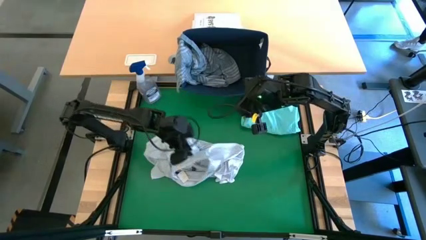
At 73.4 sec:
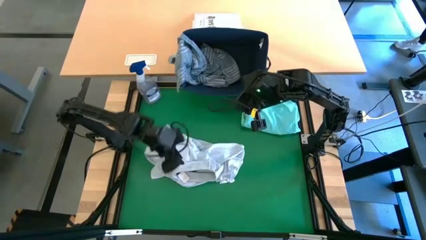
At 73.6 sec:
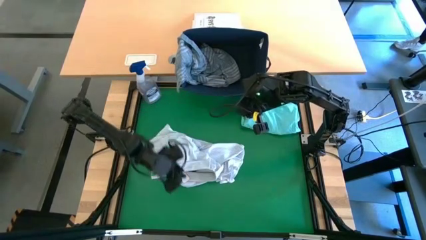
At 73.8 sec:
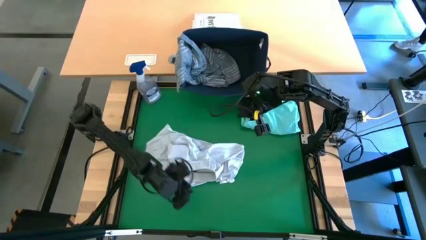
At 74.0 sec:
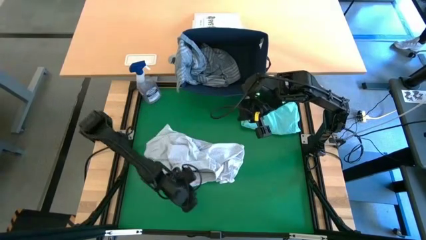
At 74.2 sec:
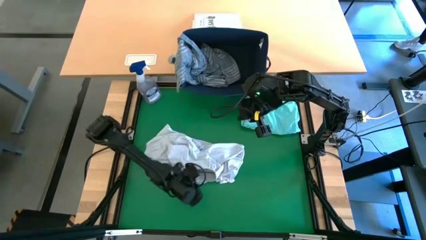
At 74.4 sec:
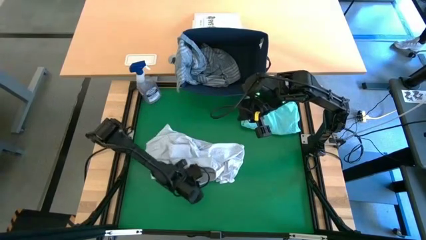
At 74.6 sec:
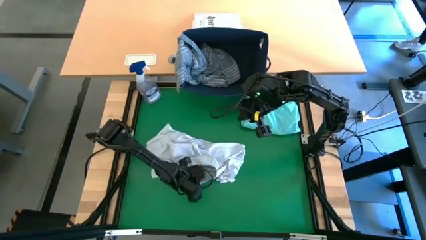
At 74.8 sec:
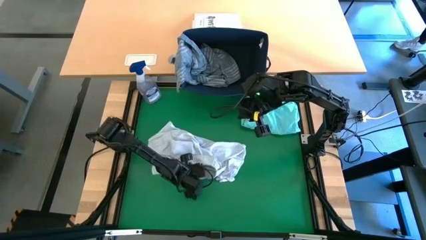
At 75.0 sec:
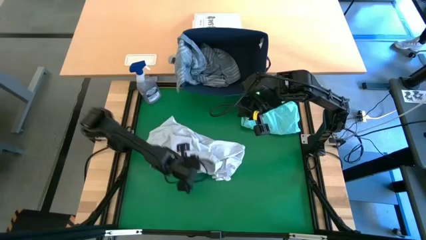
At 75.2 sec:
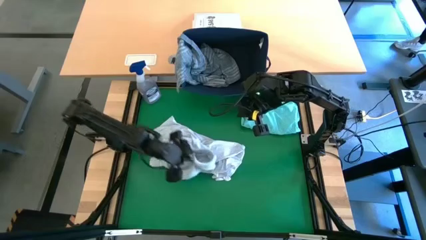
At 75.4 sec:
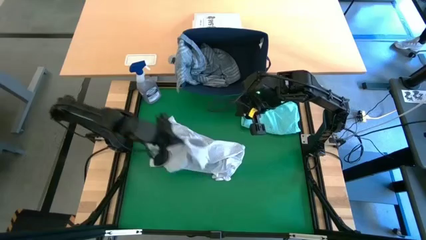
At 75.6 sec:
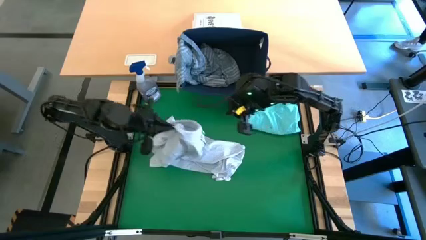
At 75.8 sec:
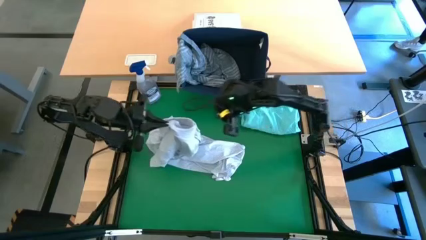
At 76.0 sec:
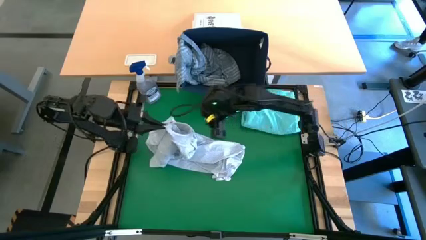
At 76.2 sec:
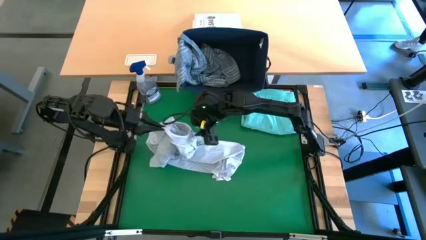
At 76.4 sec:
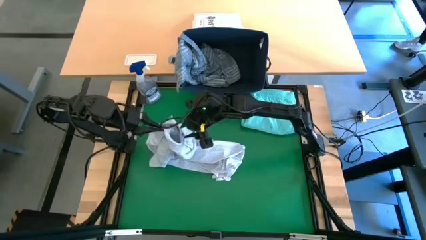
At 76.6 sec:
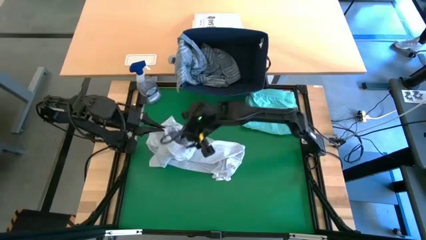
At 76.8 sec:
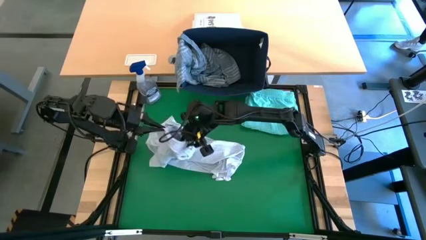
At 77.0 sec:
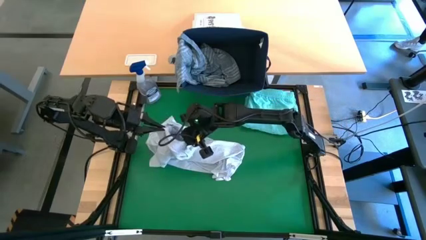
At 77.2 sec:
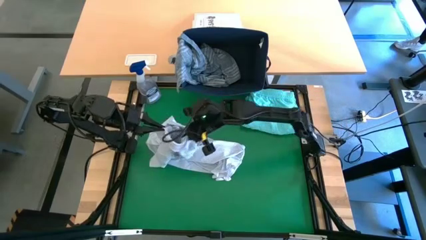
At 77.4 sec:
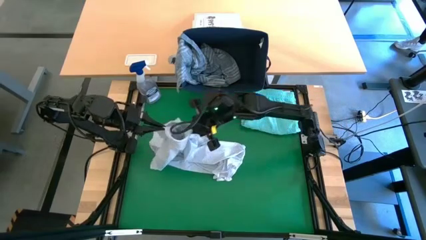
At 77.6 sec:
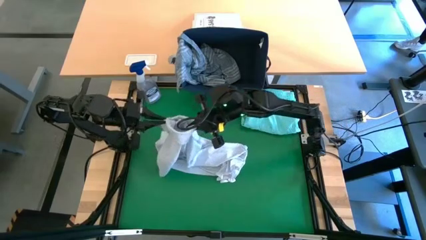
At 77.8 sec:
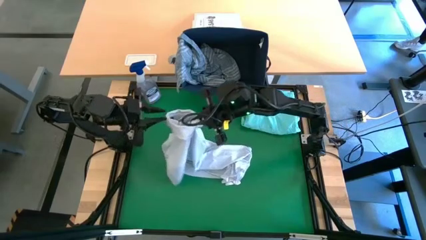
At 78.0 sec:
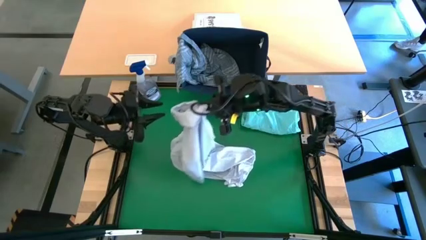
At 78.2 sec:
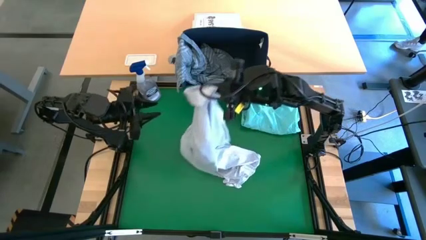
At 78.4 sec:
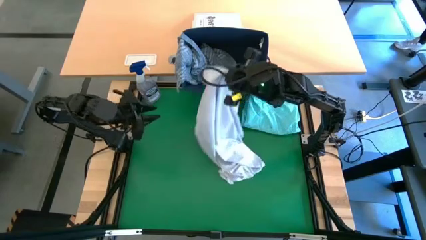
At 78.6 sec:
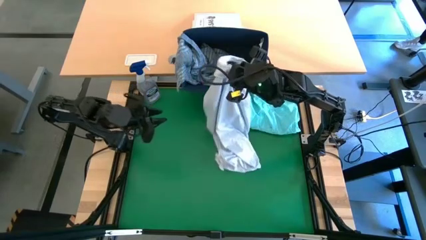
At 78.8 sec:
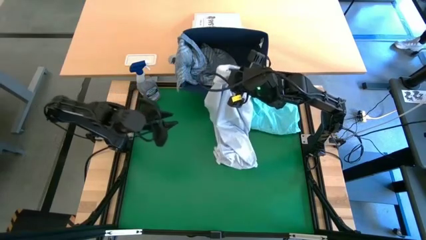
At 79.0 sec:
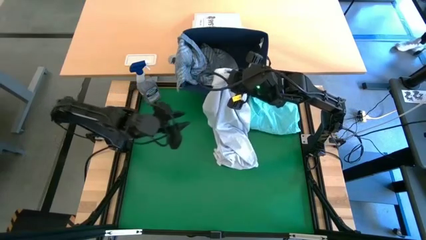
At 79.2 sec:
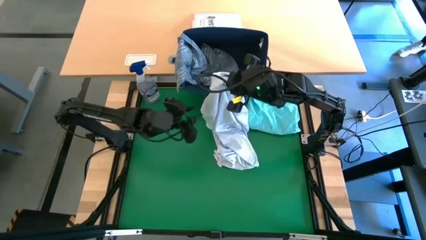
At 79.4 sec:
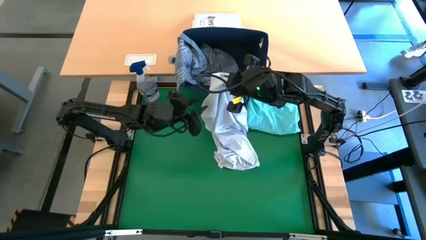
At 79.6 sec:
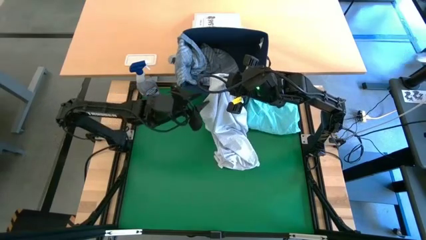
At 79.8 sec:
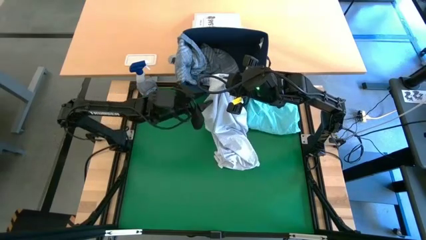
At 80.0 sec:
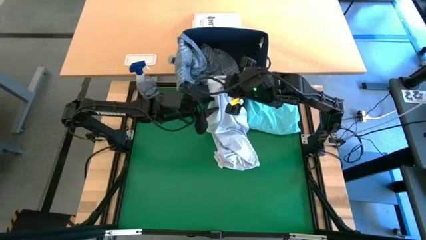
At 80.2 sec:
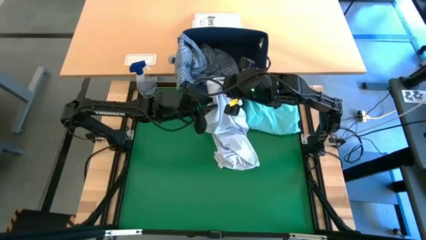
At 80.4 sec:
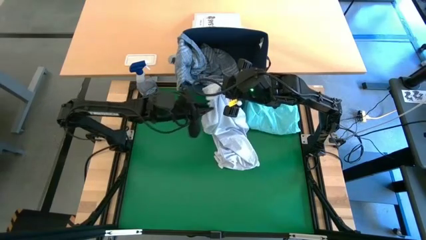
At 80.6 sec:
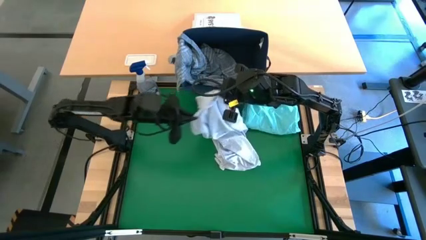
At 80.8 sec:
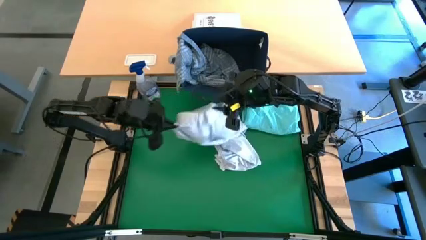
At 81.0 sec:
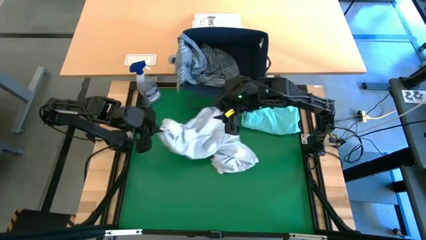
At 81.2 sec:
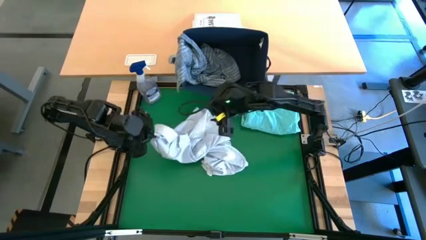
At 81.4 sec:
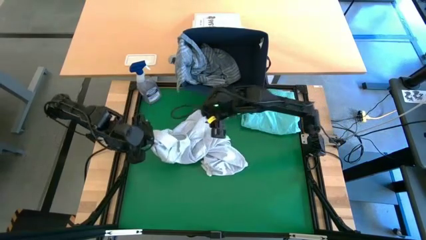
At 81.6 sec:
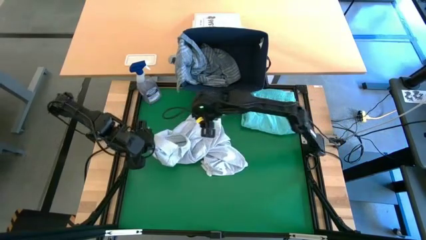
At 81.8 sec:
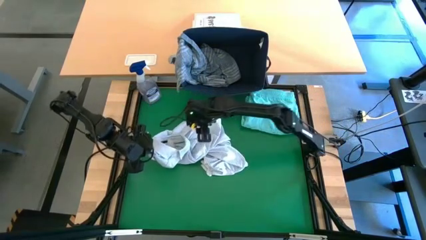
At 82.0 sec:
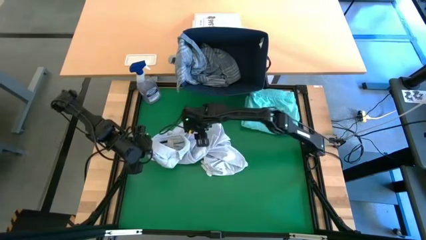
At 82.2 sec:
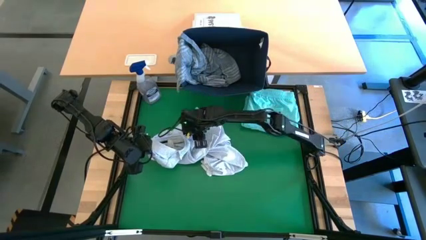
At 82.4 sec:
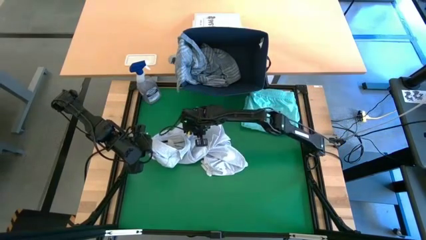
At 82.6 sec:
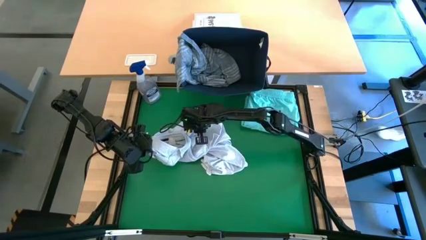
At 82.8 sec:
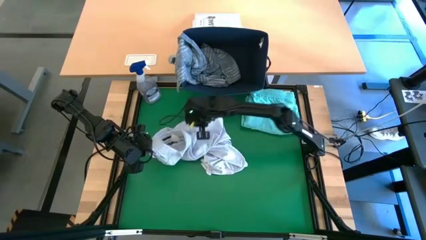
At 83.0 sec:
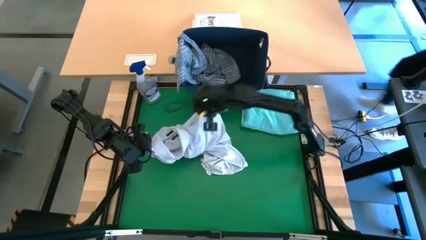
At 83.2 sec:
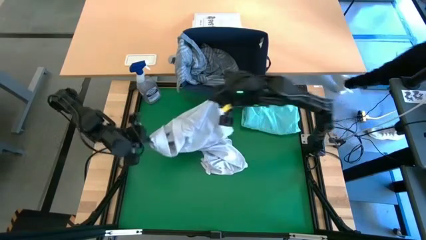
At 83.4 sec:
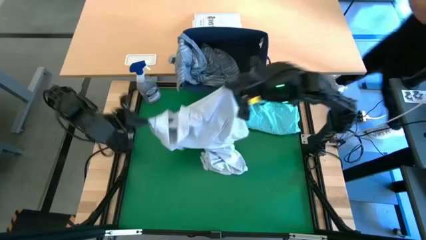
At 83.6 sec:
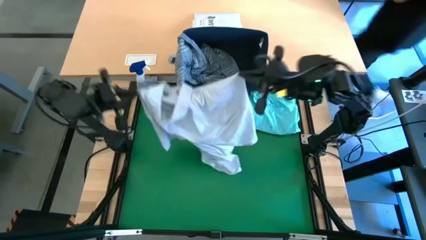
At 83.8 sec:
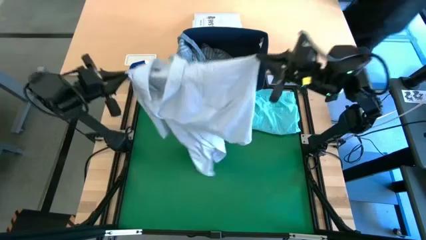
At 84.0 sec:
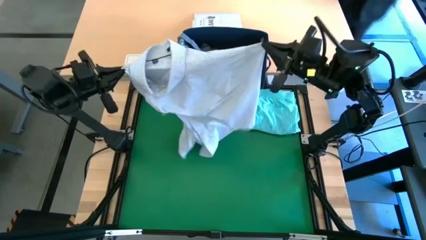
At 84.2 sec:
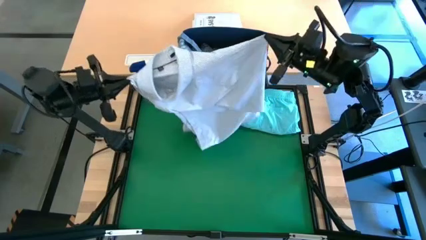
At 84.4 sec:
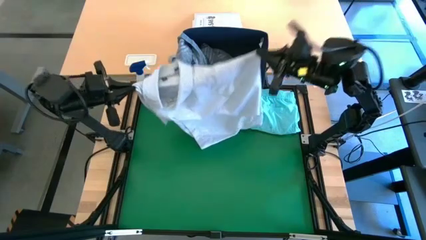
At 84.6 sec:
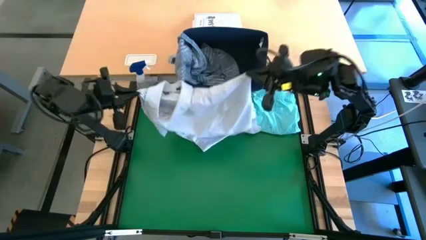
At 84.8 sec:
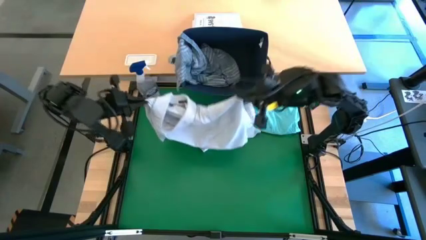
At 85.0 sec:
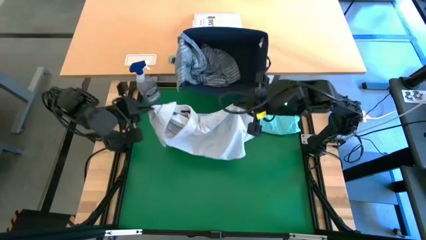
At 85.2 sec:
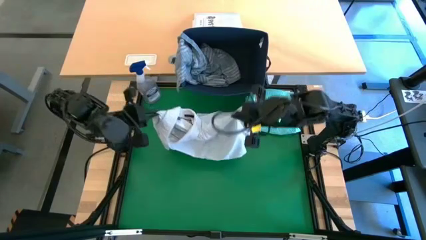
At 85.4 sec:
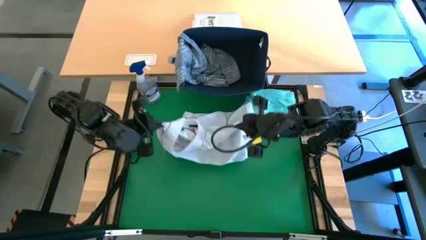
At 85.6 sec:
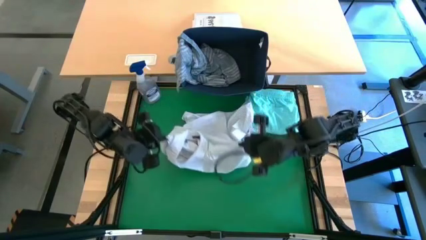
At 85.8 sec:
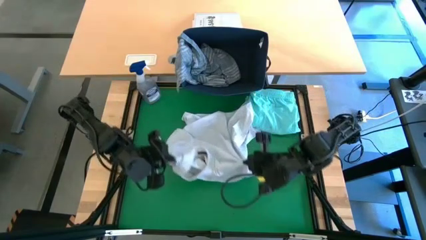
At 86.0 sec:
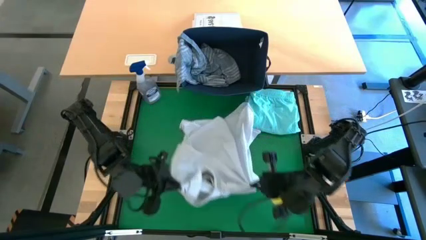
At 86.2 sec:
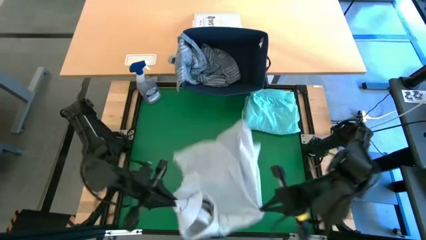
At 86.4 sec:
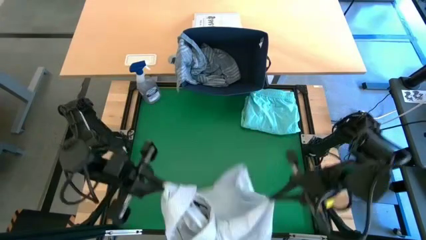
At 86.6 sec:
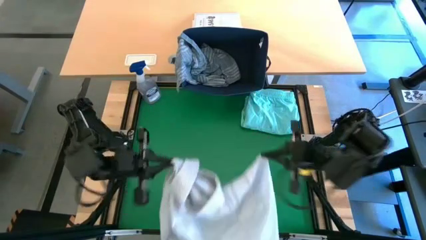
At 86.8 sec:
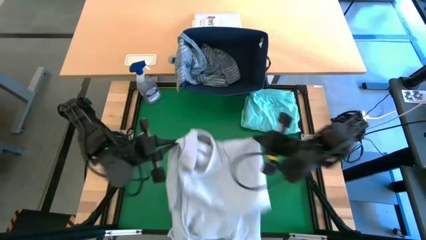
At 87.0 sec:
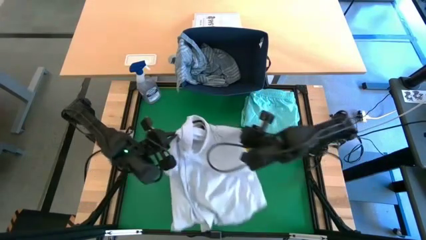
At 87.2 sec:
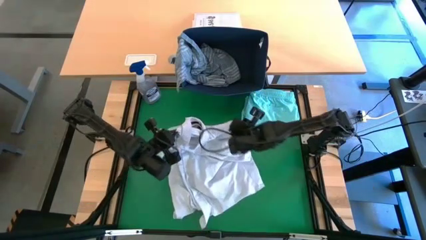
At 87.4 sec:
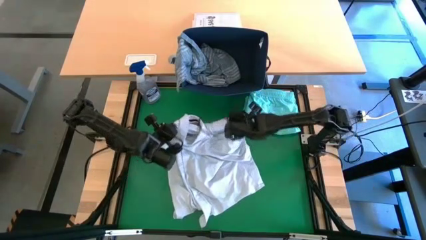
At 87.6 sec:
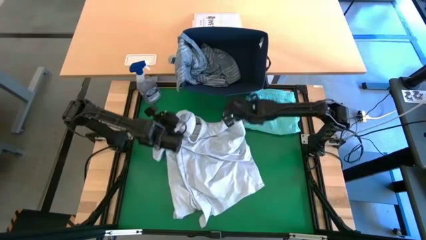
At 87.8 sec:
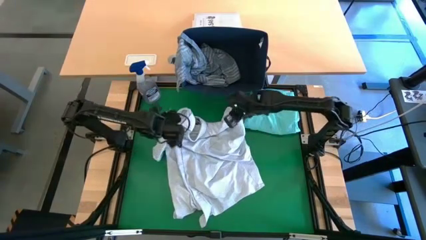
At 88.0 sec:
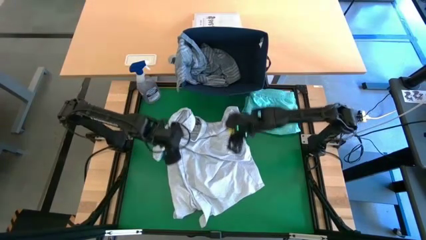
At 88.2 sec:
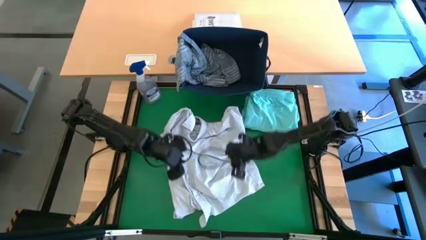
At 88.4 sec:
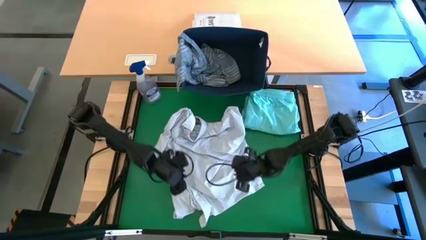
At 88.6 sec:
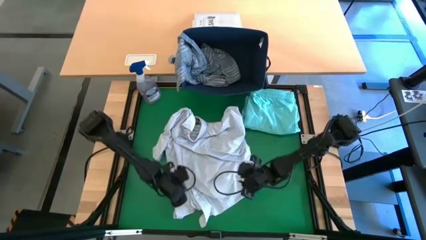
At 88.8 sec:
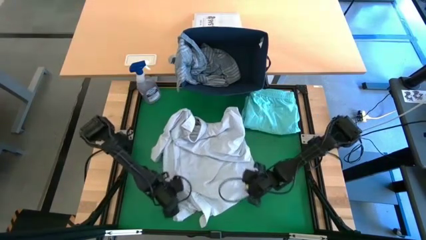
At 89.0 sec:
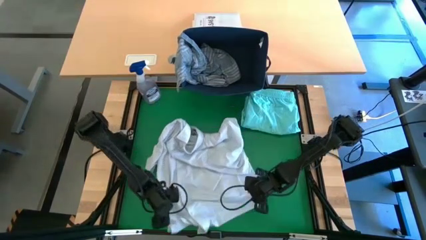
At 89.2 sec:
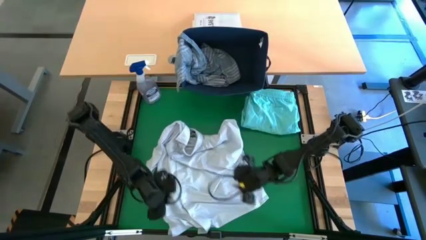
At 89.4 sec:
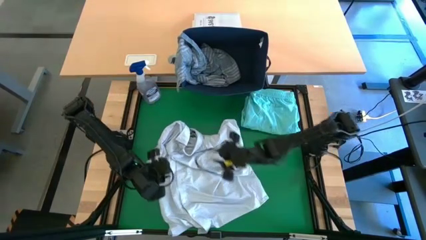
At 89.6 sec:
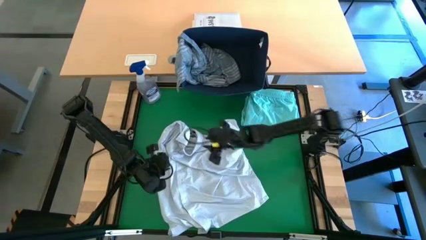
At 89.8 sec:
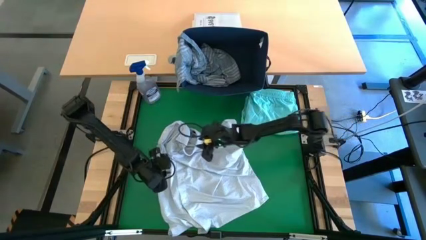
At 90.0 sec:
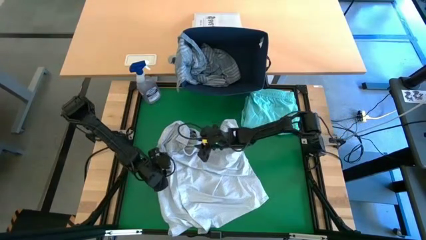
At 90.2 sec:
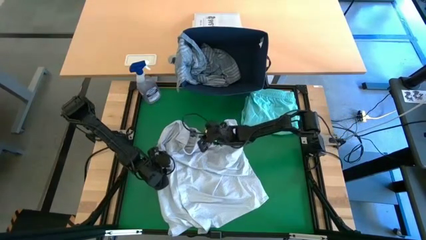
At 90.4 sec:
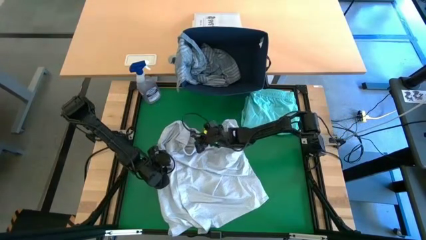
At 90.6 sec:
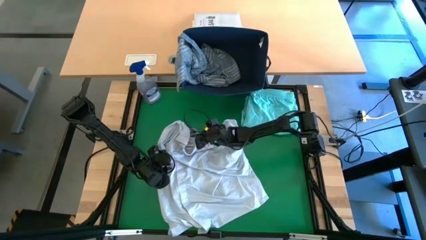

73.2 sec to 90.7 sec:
Task: Fold laundry
Fold the white polo shirt
